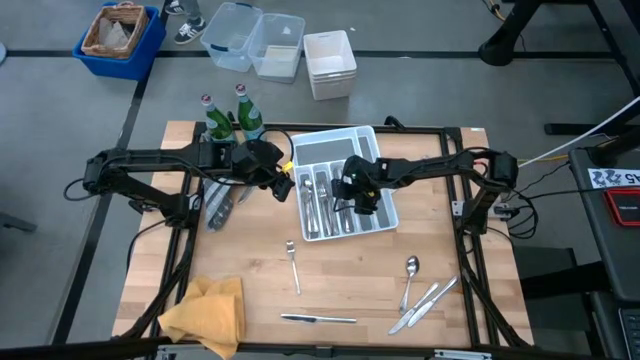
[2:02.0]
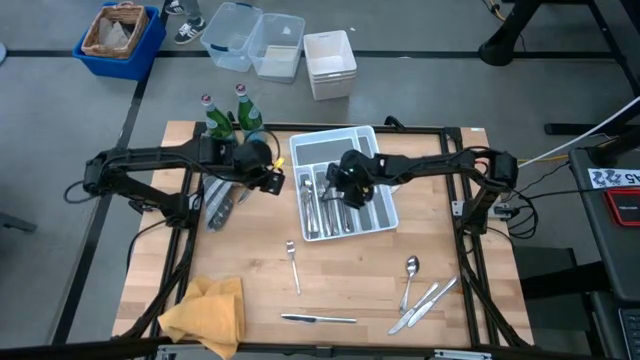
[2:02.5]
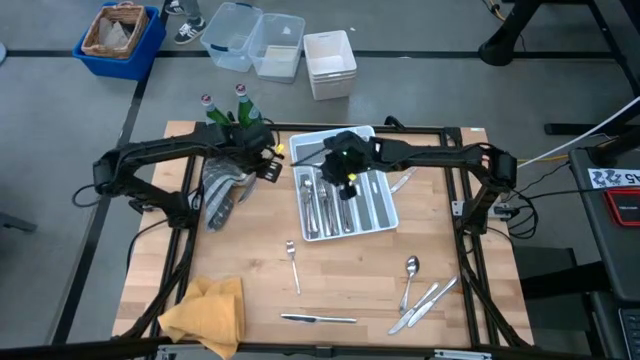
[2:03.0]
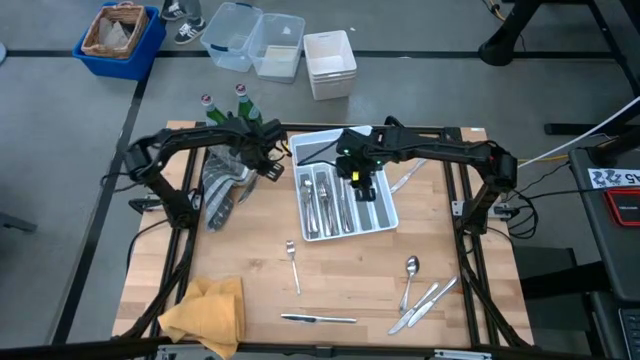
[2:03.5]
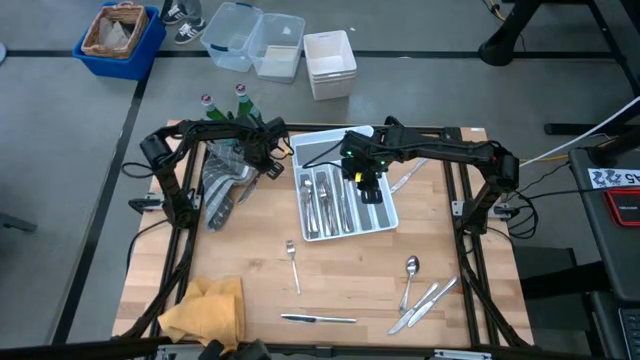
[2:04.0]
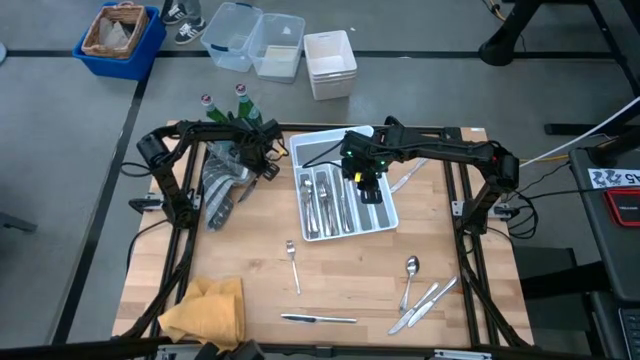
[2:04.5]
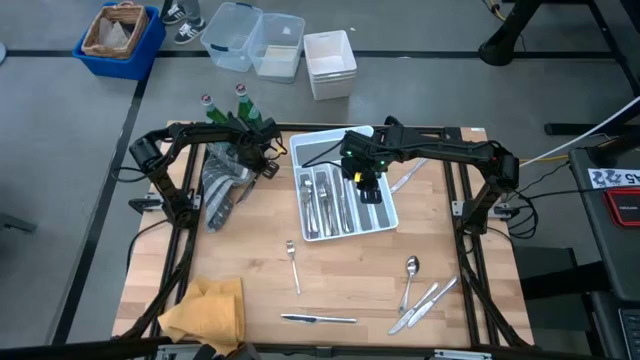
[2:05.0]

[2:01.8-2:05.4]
Task: Sort silverware
Put the silver table knife into the silverware tray

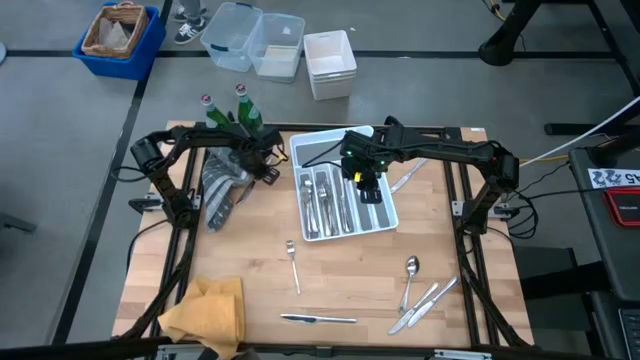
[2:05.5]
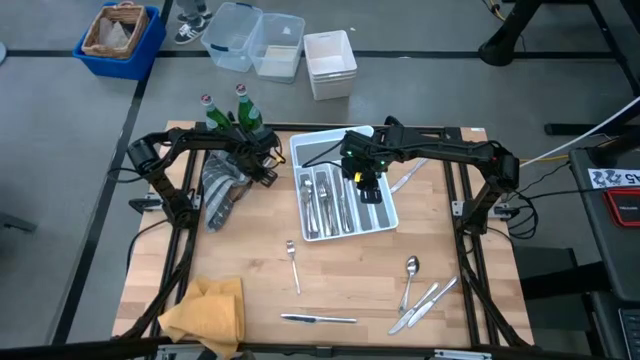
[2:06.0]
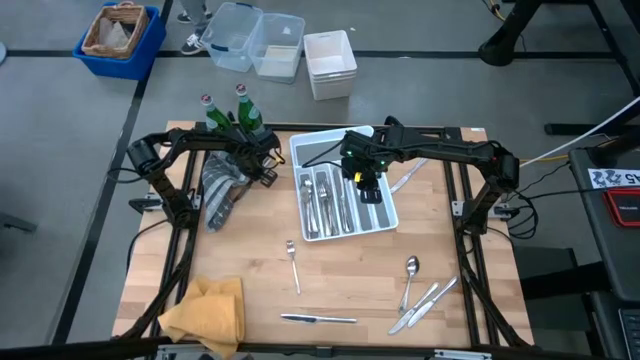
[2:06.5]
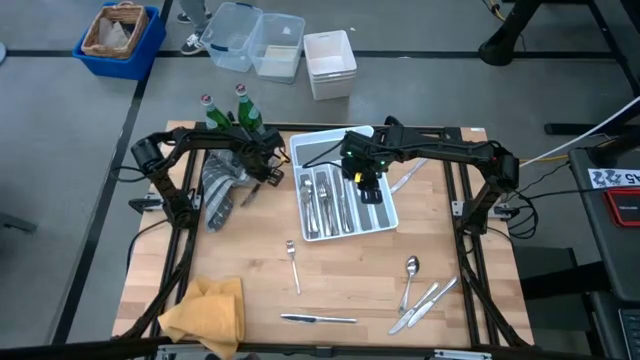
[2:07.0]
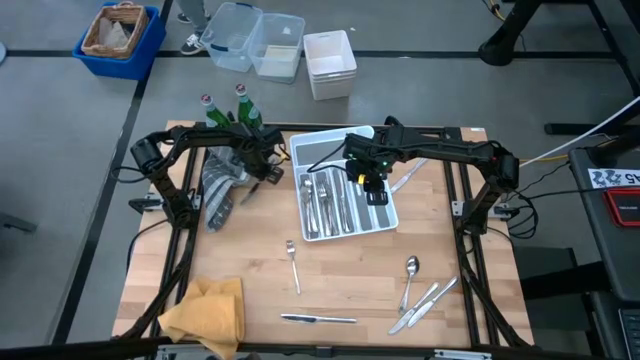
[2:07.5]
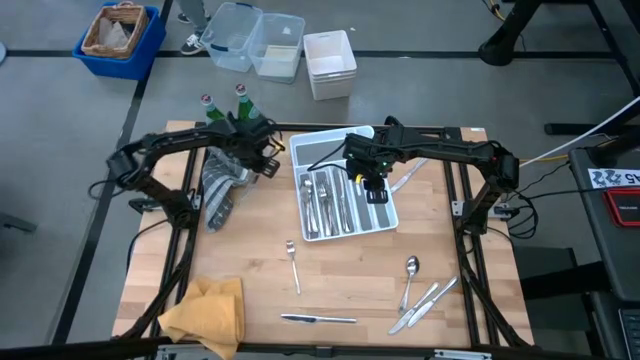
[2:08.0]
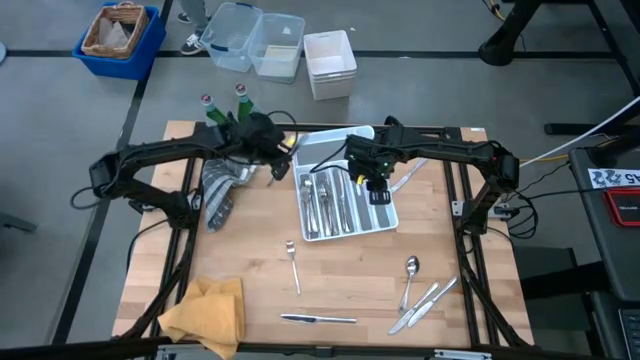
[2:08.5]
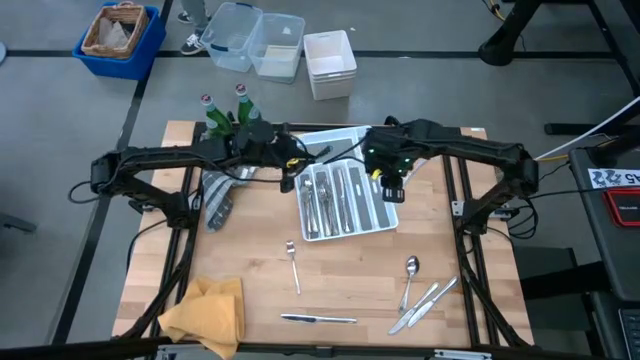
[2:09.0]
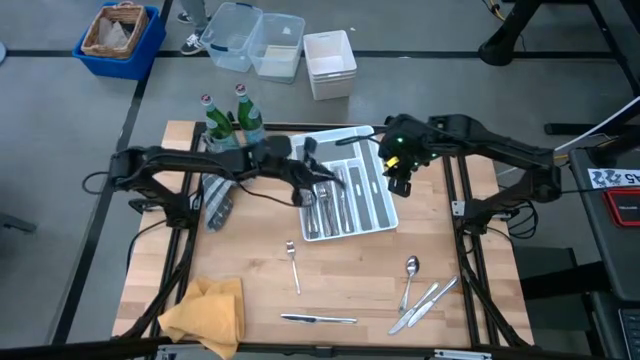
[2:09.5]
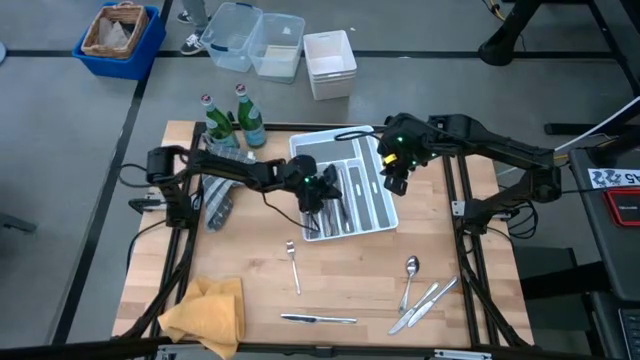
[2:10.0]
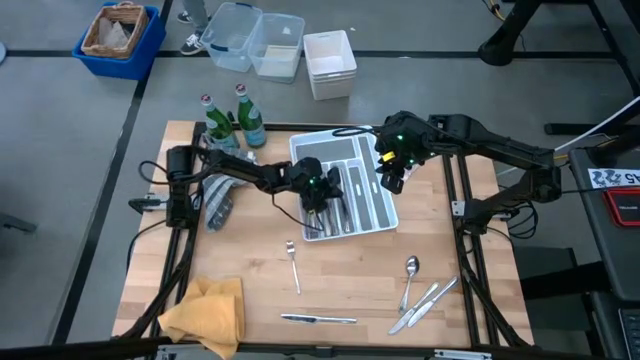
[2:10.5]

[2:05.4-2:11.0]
Put the silver table knife into the silverware tray

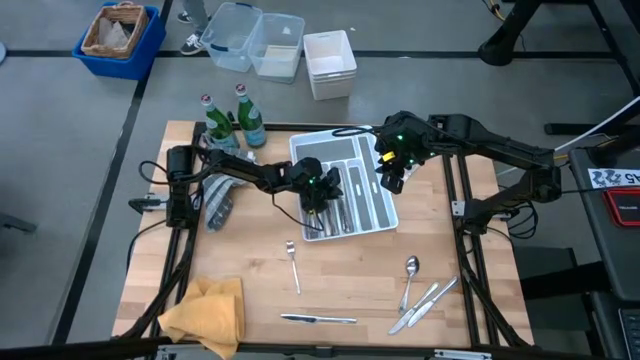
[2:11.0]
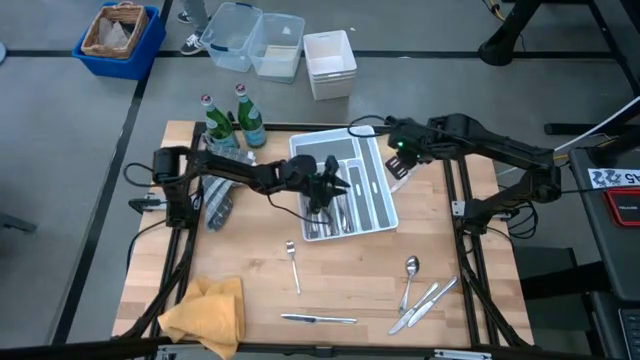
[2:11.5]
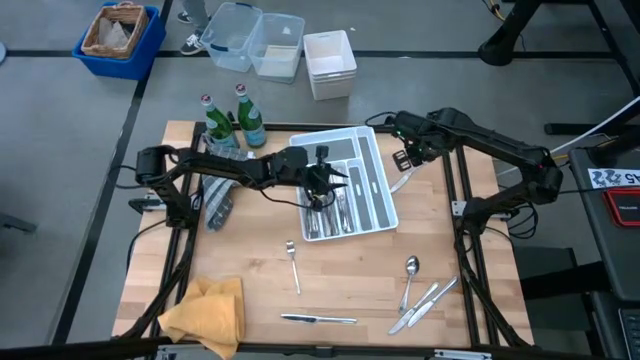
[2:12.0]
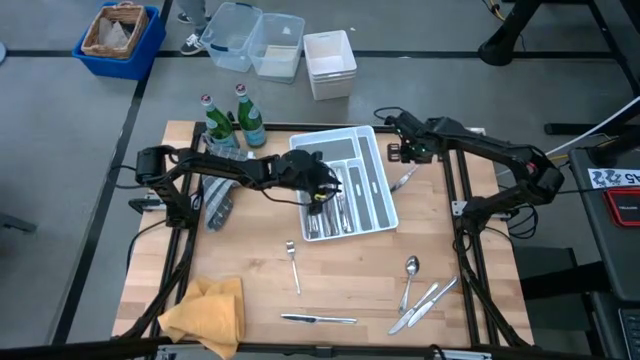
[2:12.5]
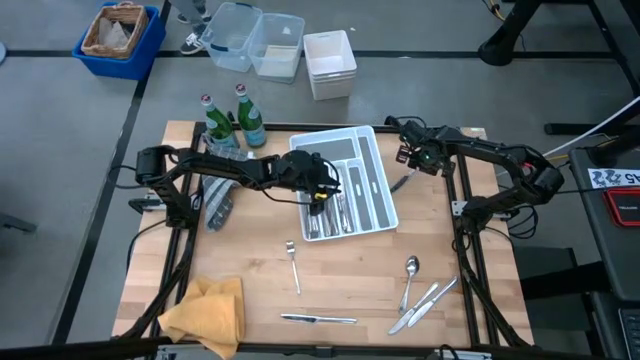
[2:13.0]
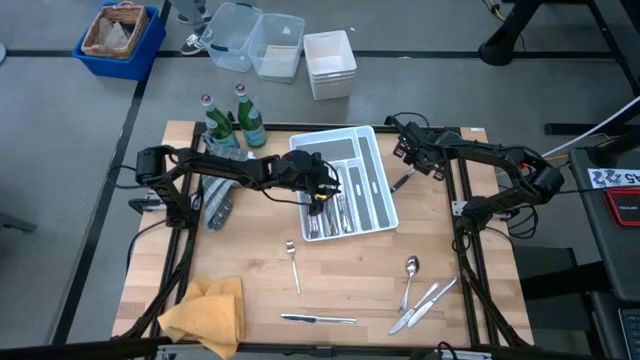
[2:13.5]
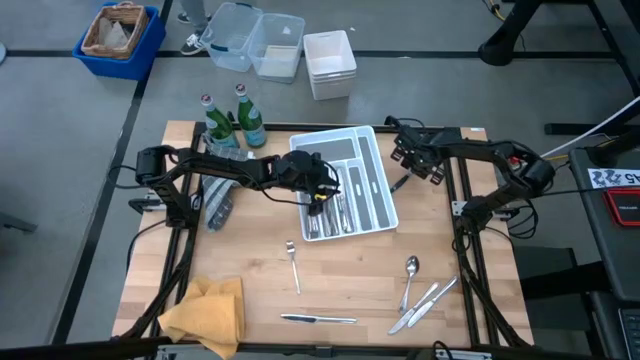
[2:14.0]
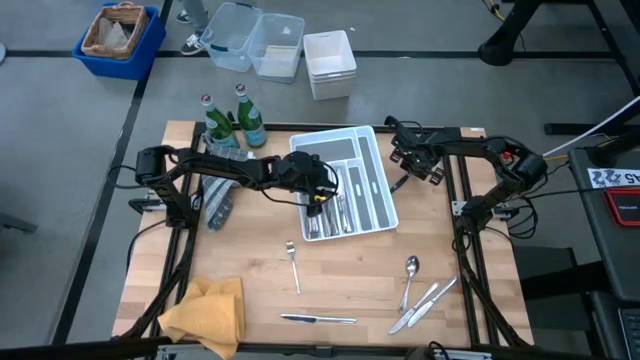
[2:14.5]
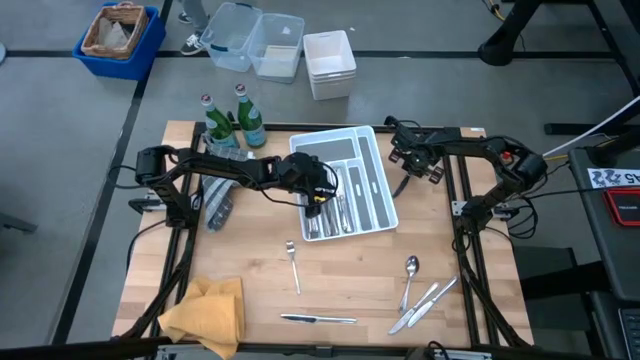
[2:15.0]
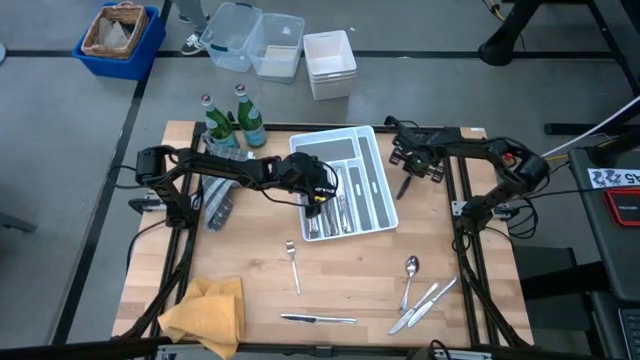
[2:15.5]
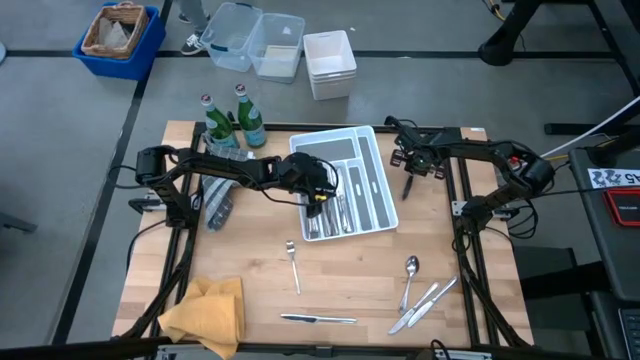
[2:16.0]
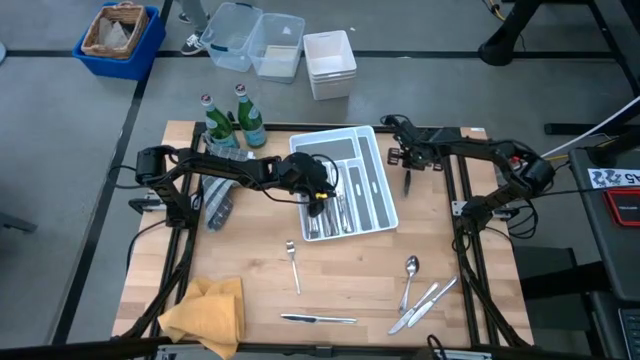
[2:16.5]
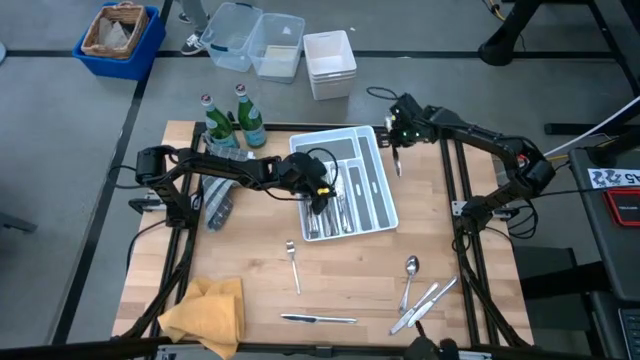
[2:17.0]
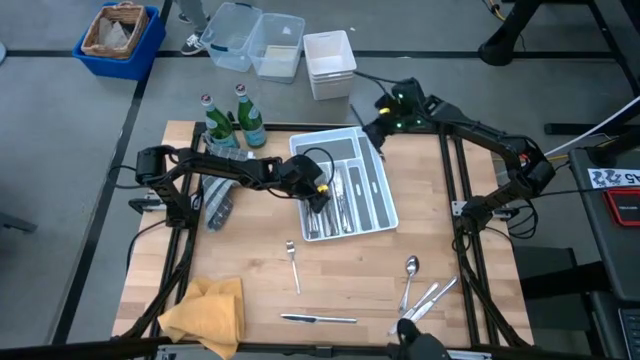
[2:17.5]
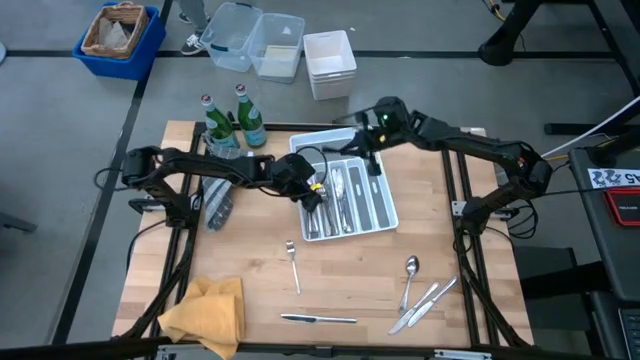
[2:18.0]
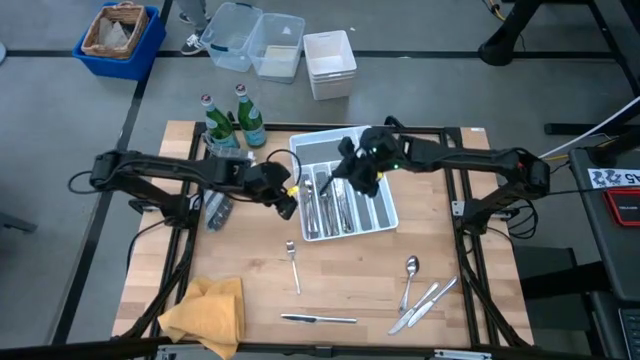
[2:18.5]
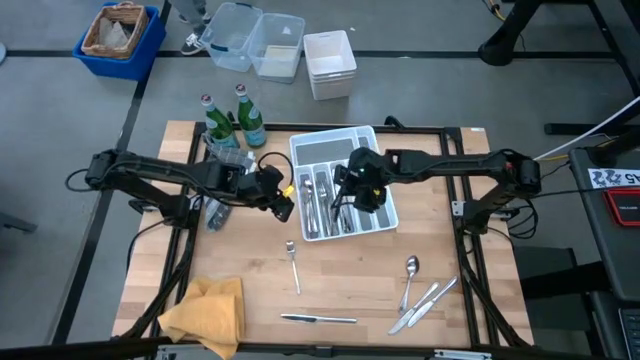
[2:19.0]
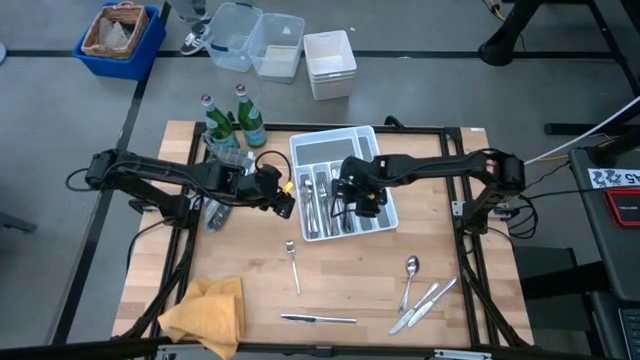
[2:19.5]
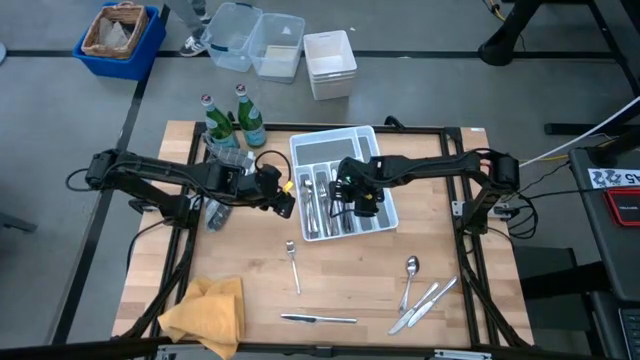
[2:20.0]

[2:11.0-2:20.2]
Put the silver table knife into the silverware tray

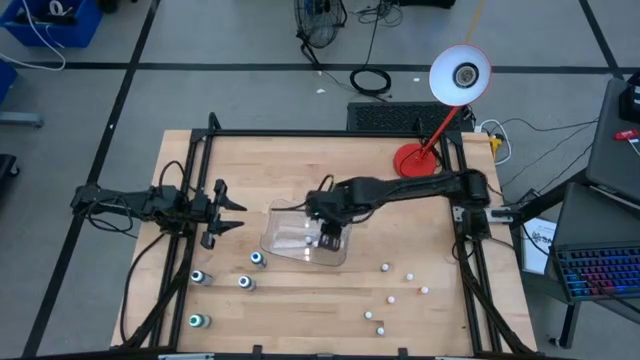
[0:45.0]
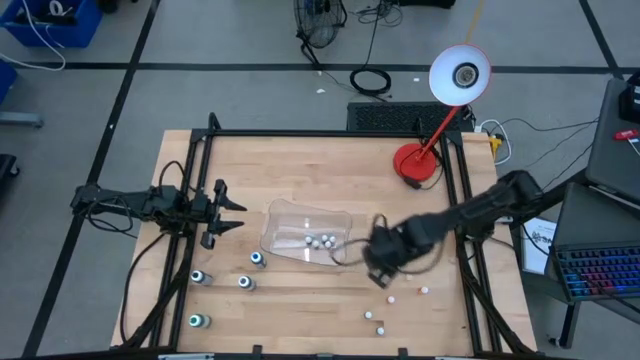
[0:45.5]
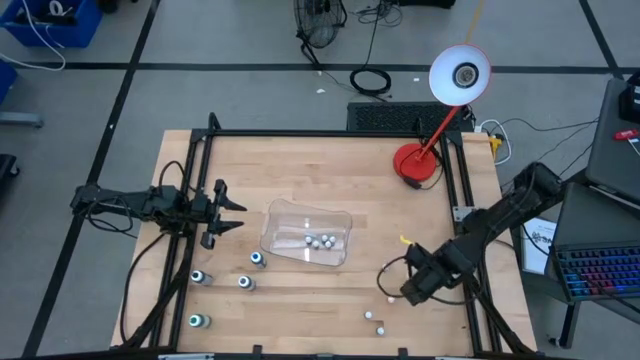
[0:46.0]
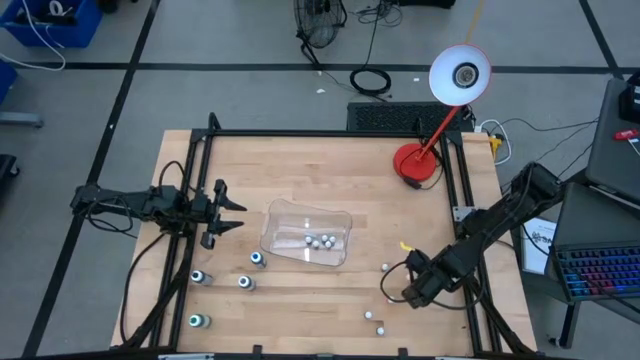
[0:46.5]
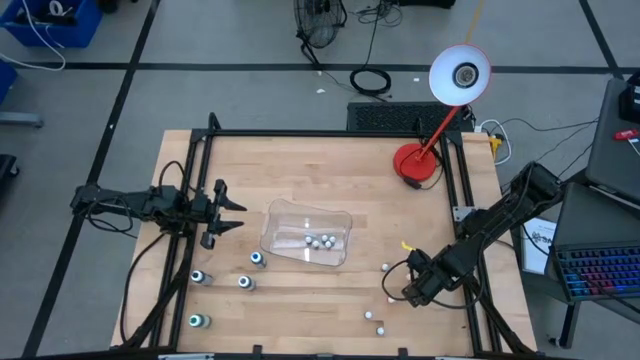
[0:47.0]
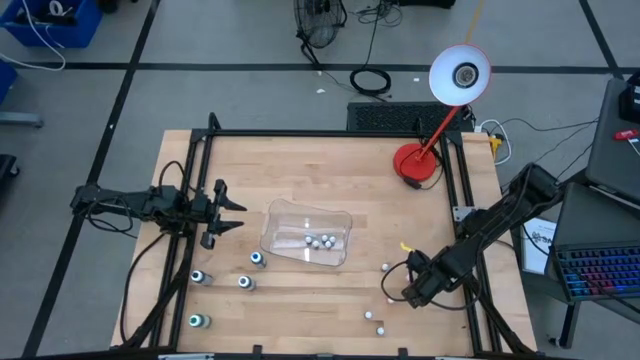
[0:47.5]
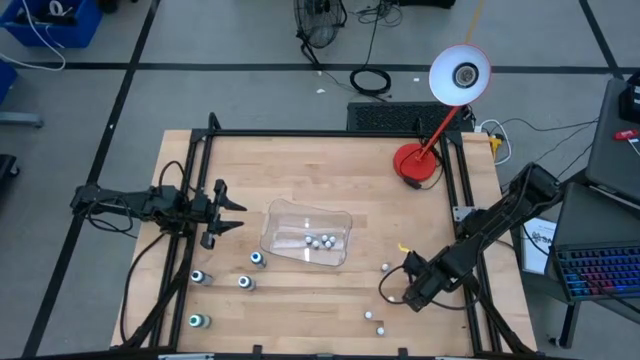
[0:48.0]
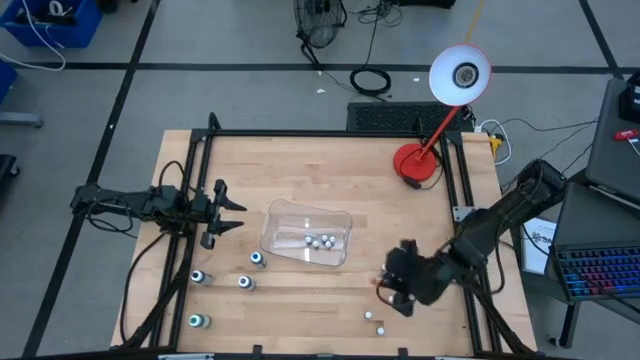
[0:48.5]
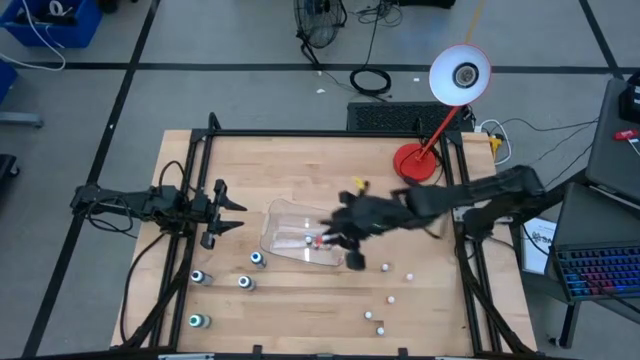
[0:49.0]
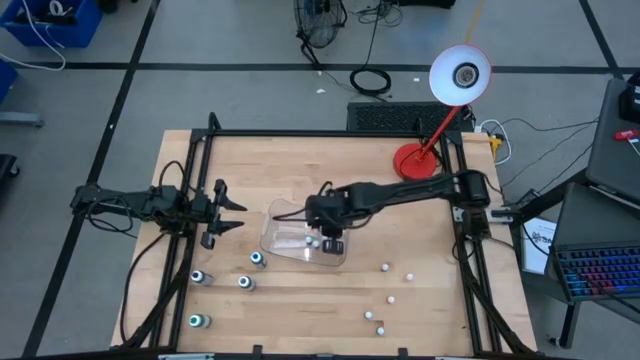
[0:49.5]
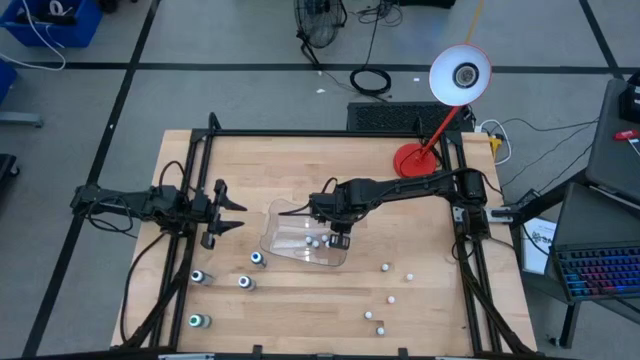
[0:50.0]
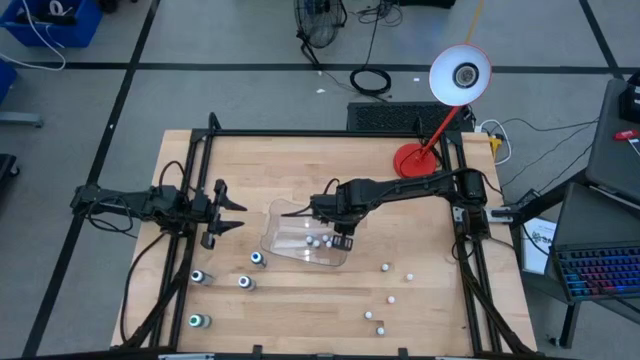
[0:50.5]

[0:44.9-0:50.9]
Task: Pick & Place food coloring
Put the small orange food coloring bottle into the transparent bin
